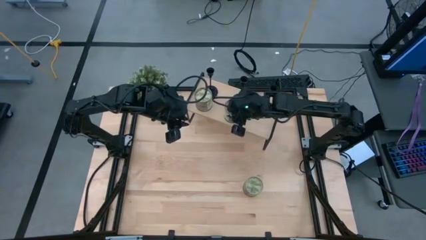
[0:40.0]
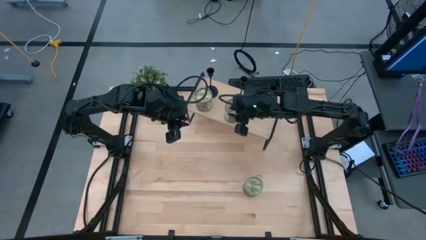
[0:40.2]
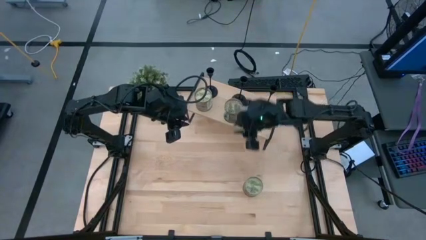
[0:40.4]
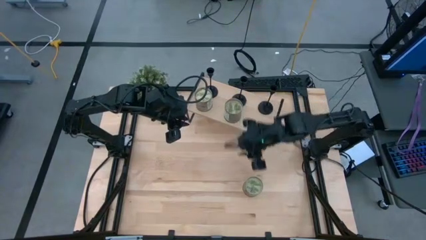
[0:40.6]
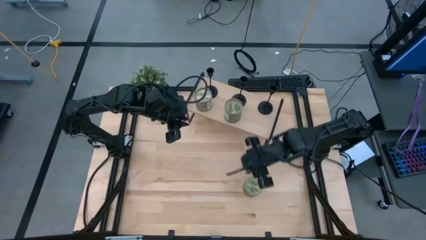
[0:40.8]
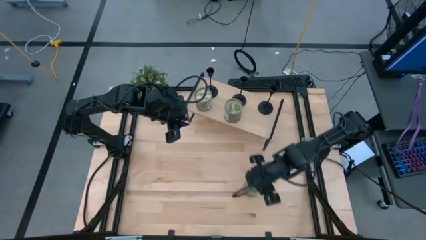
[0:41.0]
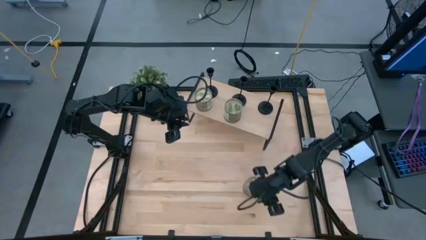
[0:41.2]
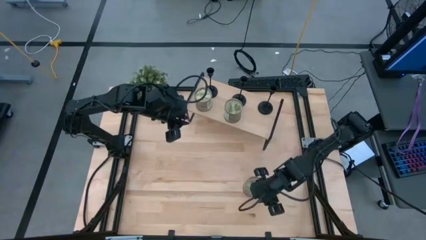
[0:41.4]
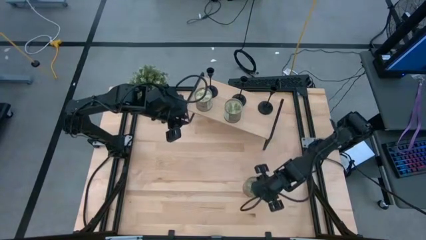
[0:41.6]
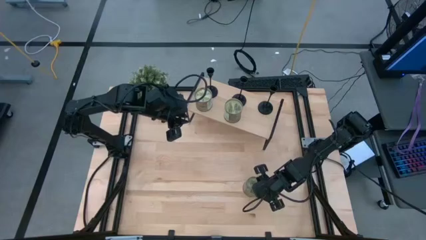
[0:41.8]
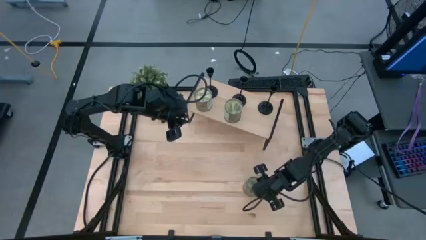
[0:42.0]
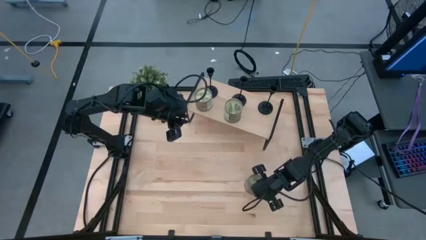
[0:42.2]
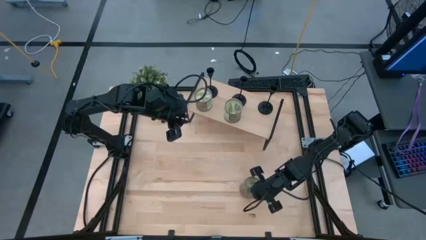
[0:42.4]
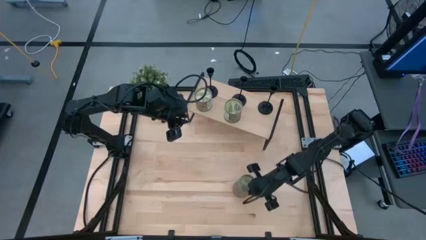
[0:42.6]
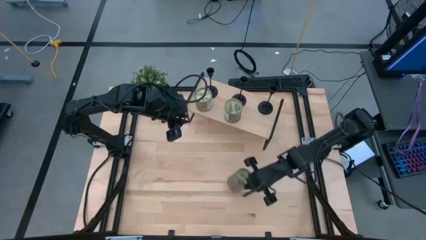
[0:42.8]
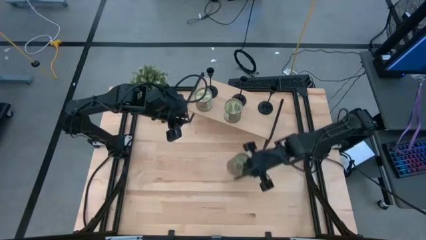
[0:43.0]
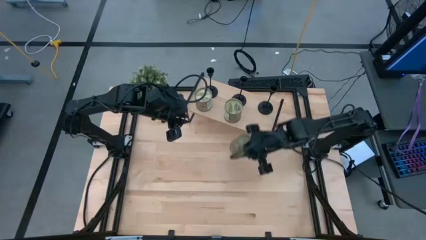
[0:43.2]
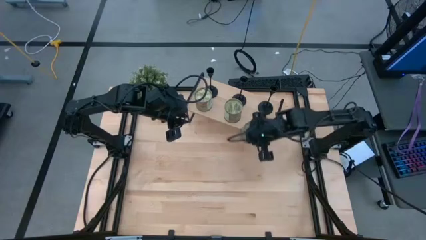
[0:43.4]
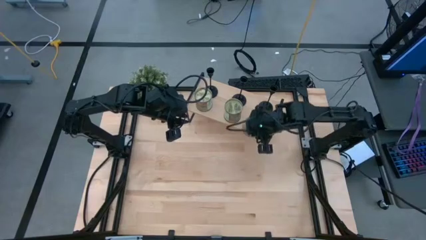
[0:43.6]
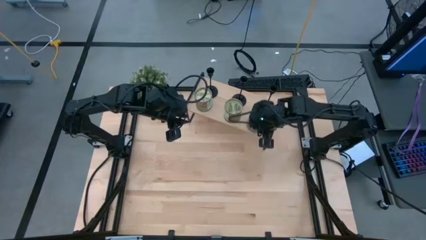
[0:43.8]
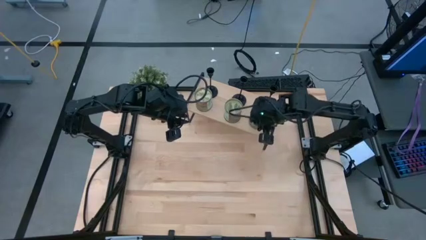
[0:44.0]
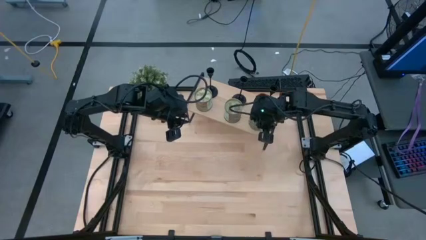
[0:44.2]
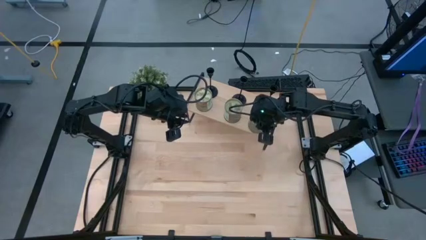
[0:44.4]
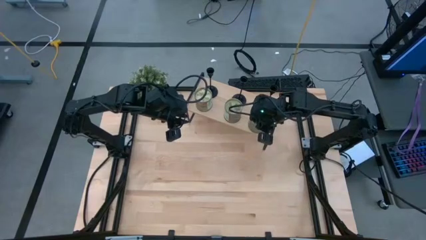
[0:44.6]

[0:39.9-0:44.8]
Task: Pick & Place candle stick holders
Align the silver scented candle with the other silver scented candle on the shelf

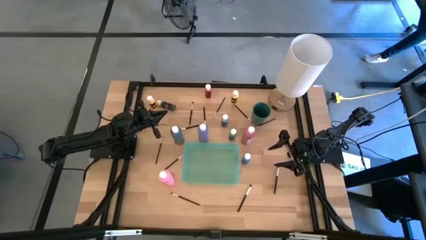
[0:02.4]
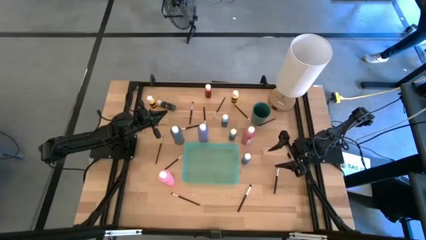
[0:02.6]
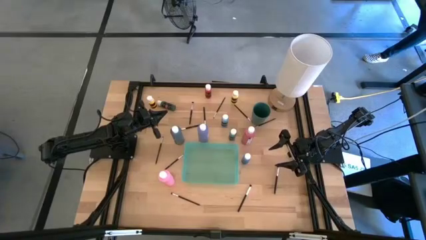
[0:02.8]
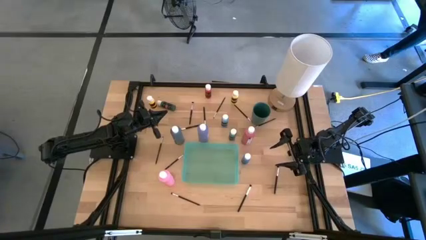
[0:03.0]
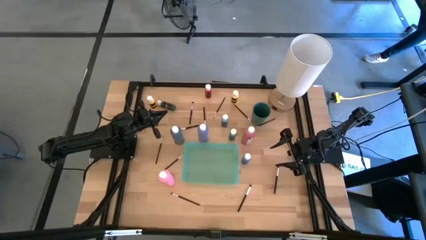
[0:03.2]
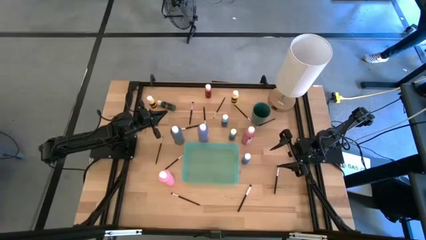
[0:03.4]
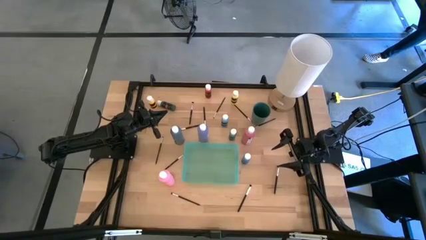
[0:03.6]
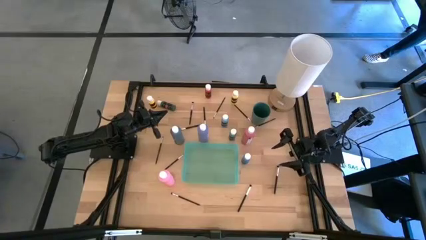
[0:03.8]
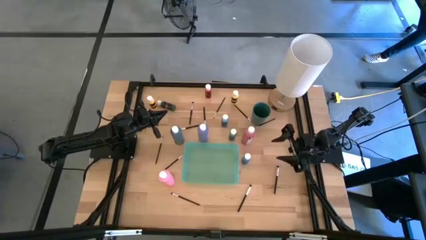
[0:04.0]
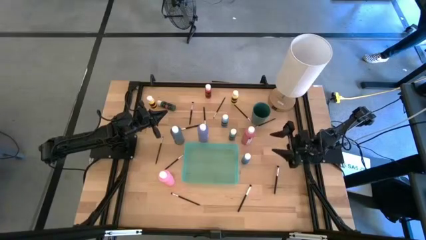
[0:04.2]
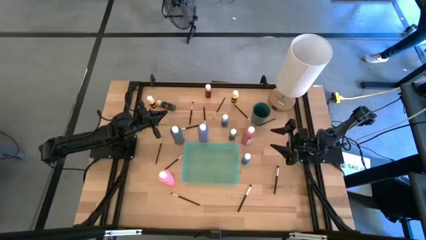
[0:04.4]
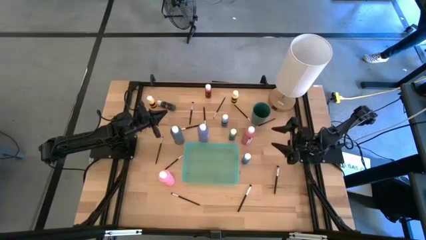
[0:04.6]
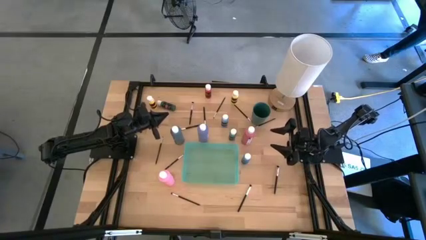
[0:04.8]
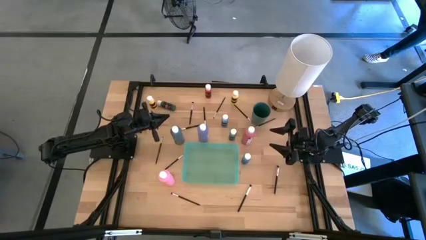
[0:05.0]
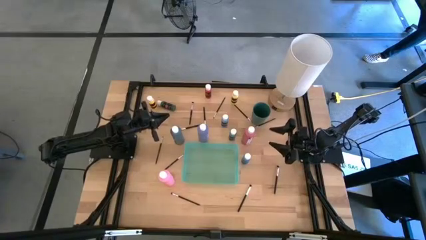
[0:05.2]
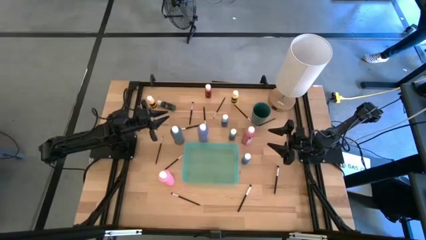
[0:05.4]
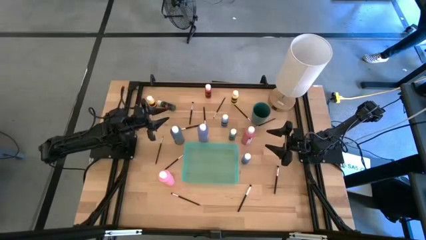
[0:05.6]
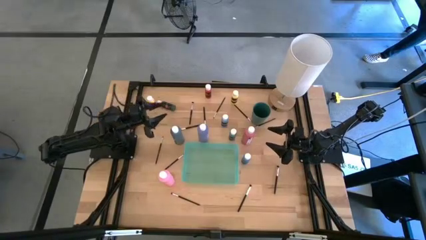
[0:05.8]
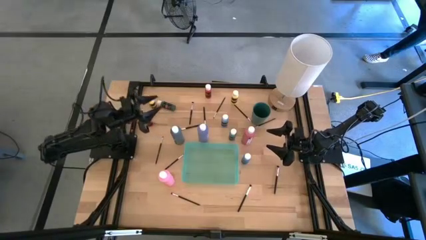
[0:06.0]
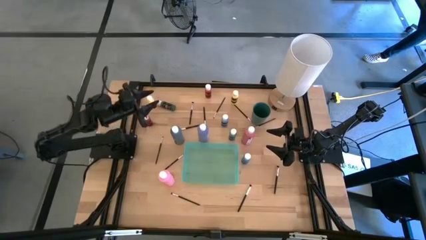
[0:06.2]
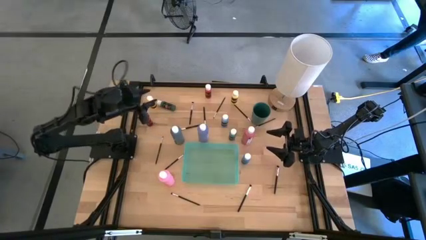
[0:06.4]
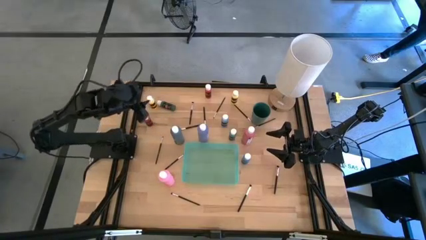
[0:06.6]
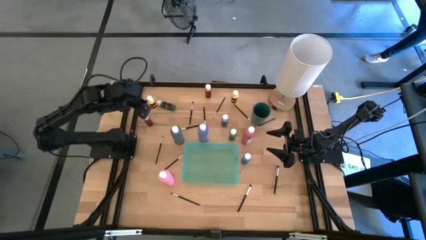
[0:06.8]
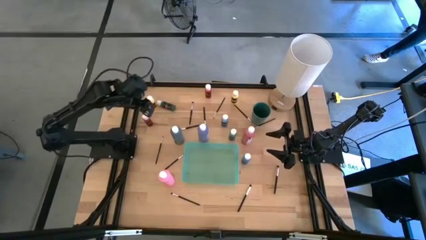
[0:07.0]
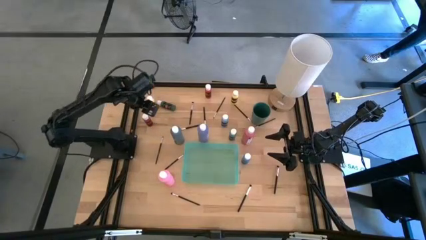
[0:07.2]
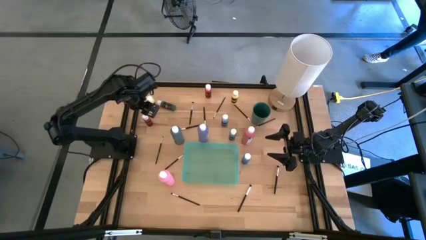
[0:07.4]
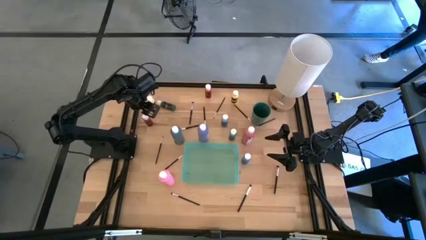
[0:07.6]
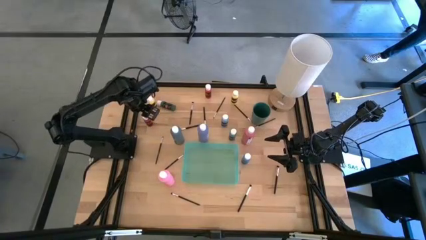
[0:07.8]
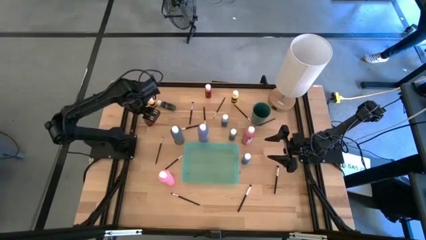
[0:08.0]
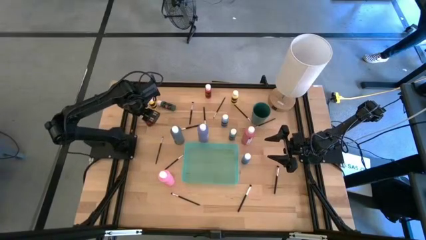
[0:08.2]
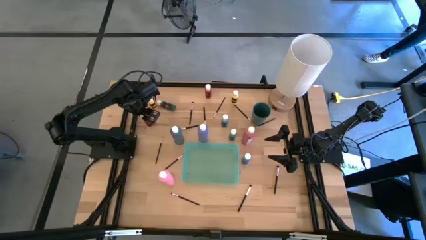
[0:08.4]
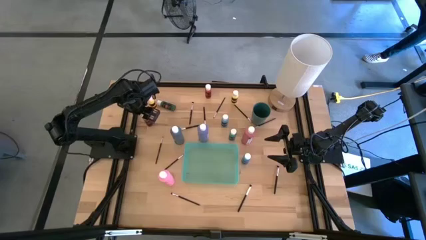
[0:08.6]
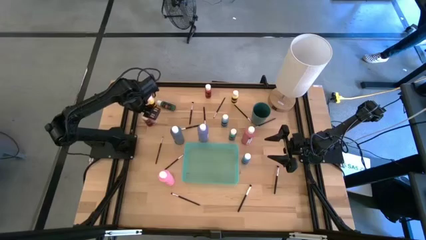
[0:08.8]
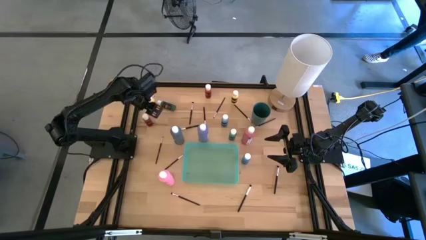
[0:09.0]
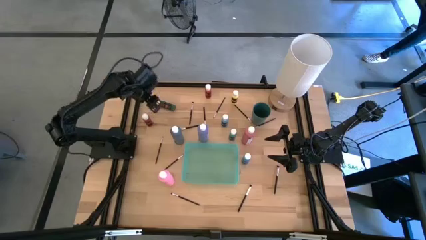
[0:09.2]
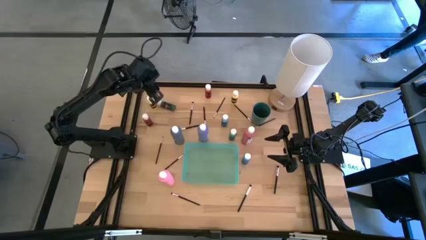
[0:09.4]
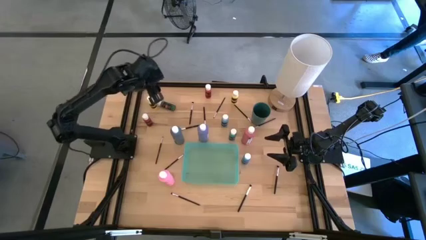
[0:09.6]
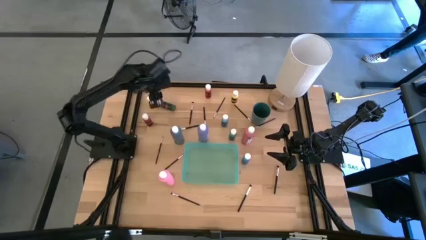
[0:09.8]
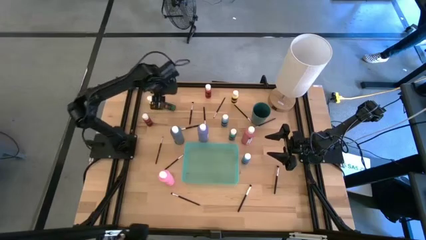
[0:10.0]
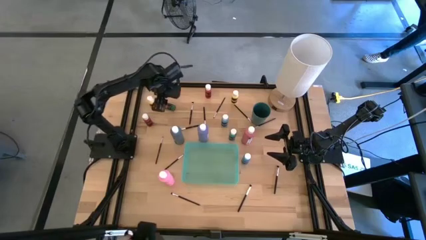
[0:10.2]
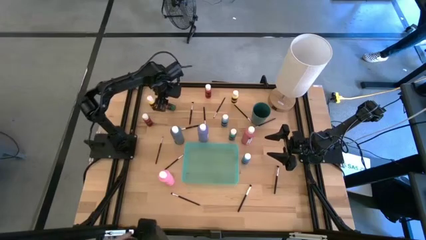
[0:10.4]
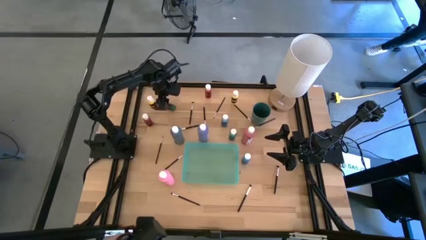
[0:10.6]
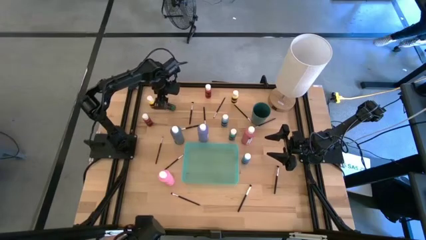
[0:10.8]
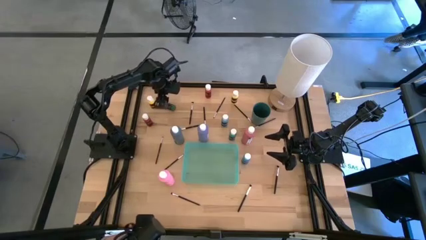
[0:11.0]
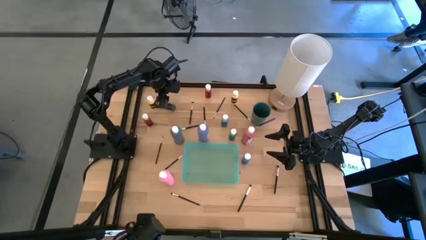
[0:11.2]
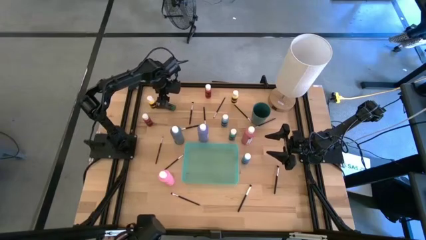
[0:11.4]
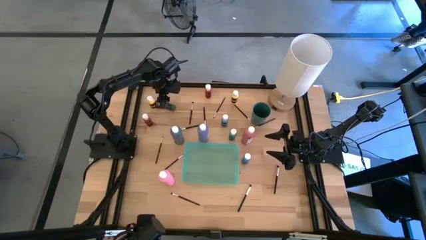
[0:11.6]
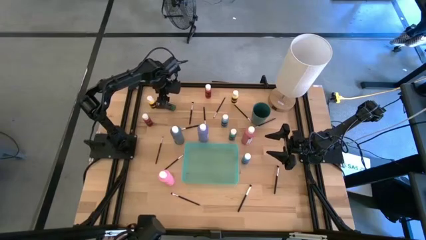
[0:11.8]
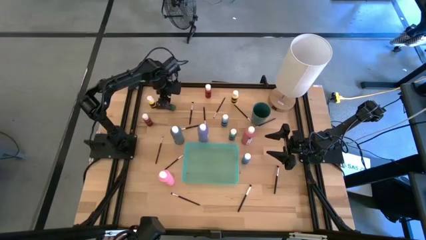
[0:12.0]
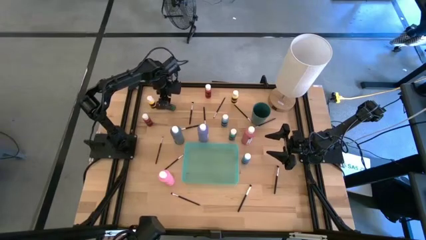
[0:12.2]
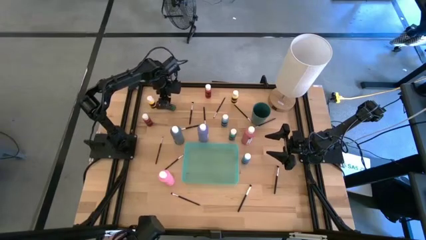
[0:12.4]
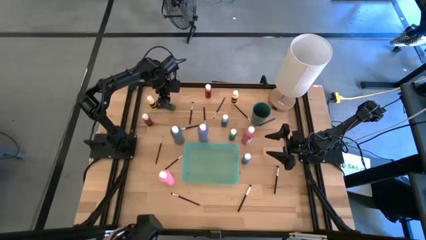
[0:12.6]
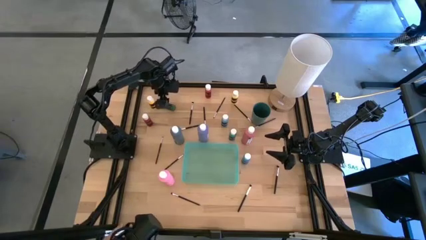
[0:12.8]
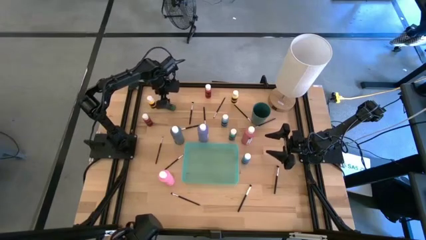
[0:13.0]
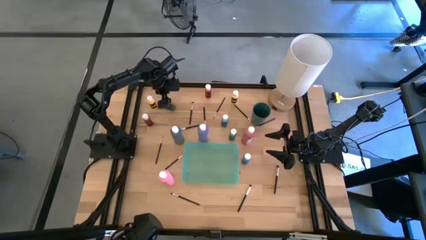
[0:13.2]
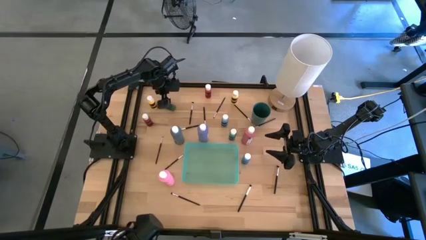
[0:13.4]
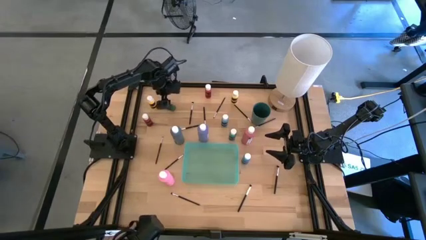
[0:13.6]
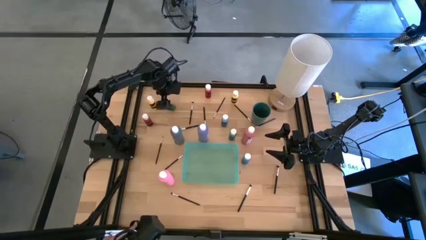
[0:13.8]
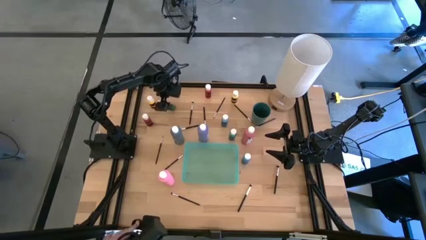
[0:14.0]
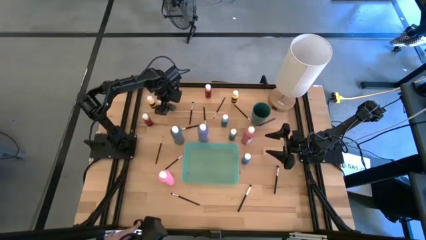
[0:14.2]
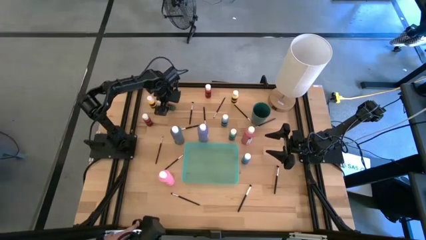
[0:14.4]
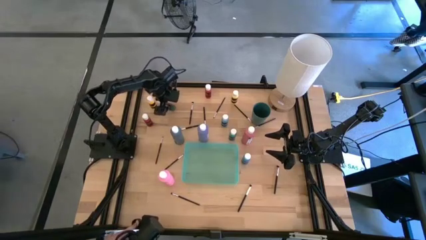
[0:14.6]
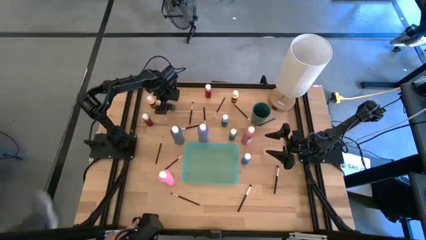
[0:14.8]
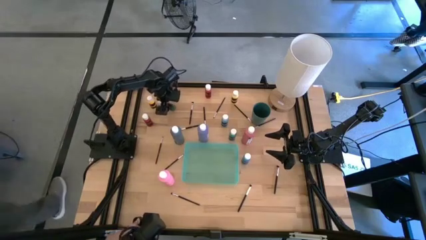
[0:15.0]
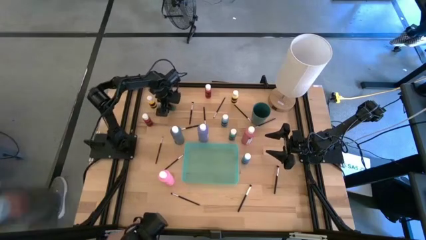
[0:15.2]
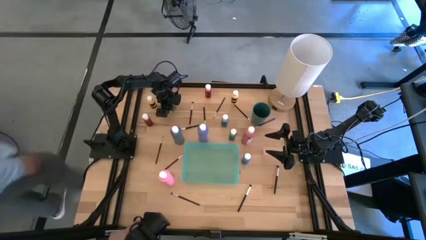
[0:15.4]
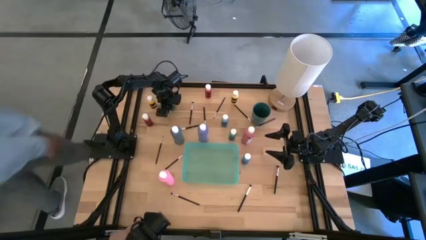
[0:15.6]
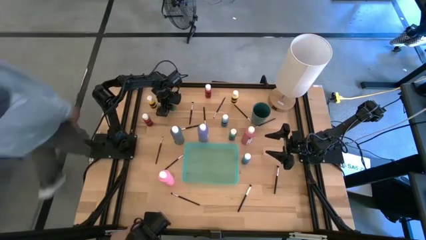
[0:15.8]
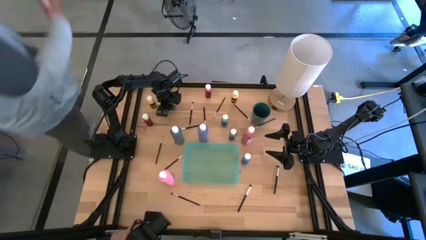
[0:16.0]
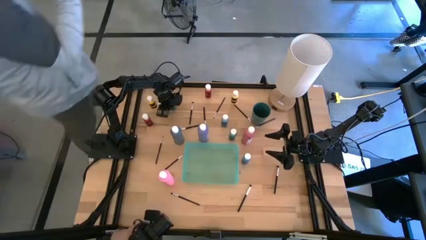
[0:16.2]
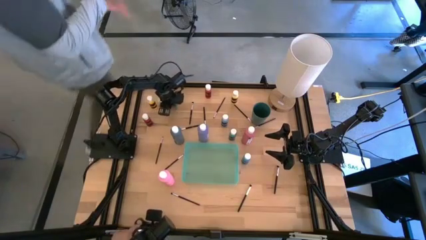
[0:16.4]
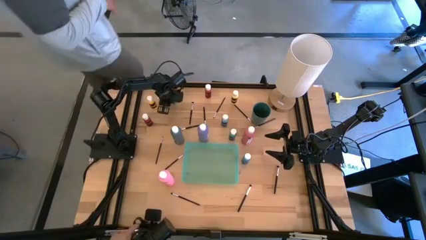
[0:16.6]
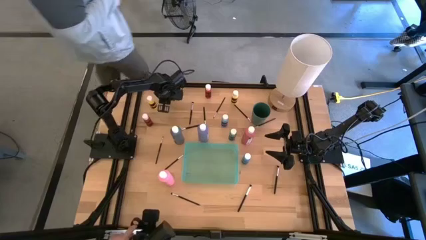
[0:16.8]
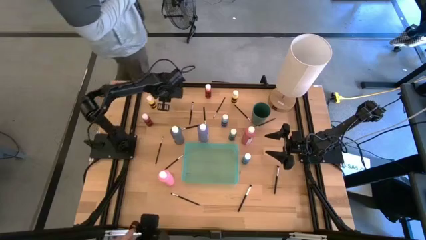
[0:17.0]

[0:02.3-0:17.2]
Task: Pick & Place Paint Supplies
Put the green paint bottle into the light green bin
